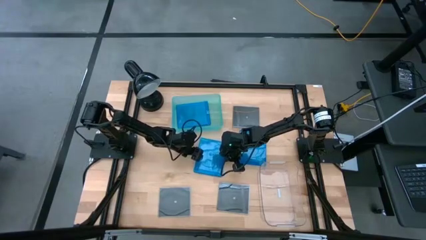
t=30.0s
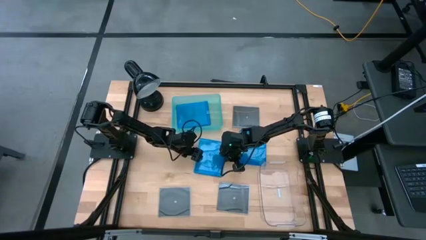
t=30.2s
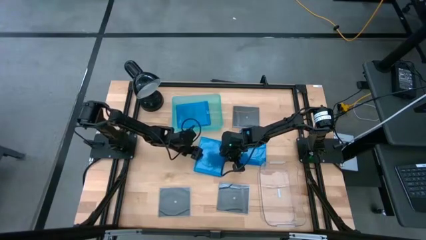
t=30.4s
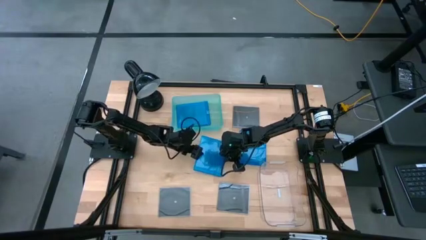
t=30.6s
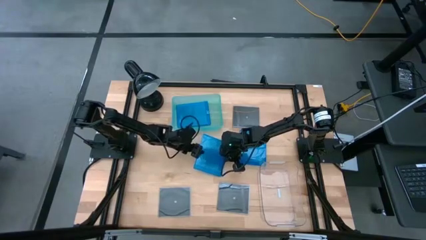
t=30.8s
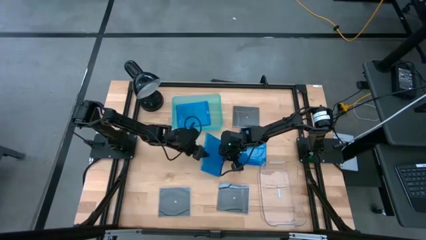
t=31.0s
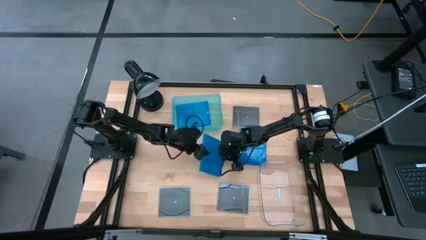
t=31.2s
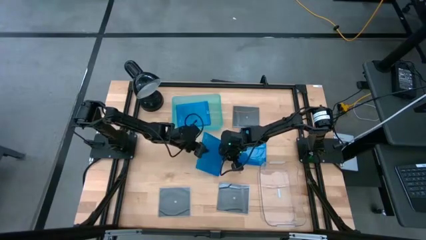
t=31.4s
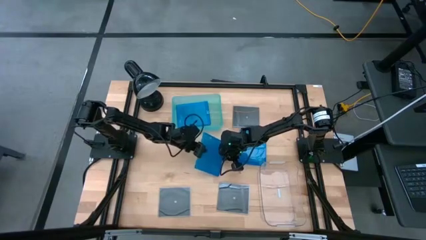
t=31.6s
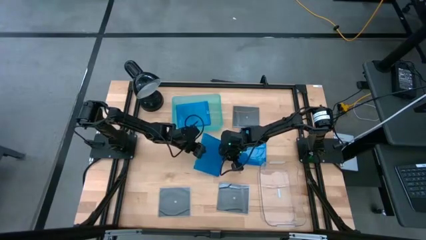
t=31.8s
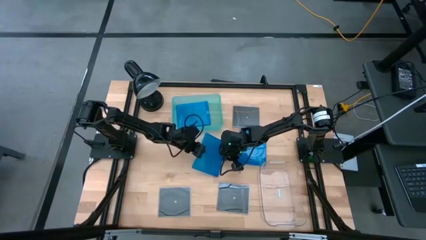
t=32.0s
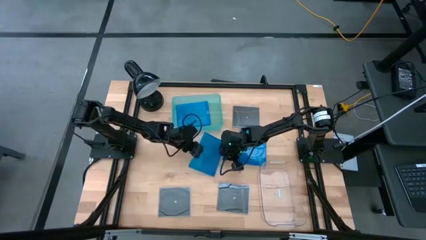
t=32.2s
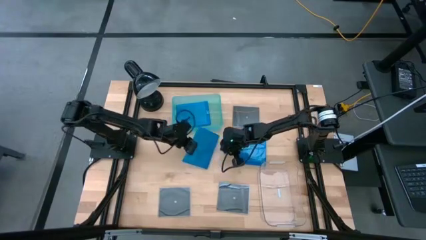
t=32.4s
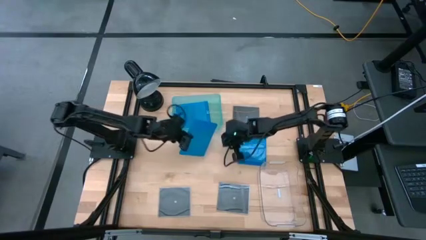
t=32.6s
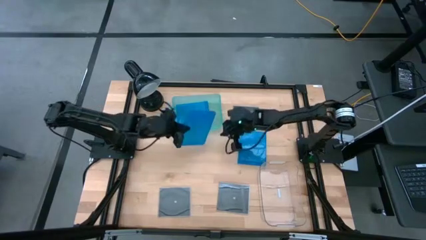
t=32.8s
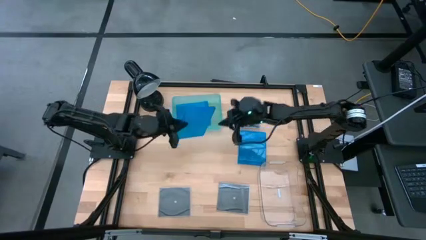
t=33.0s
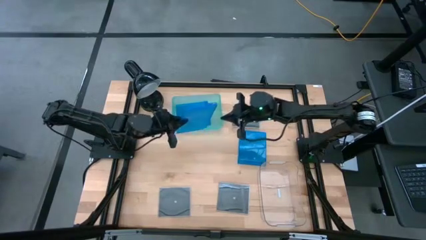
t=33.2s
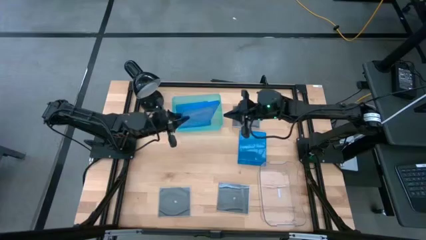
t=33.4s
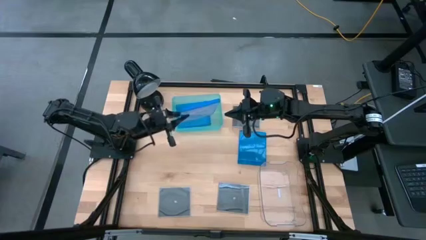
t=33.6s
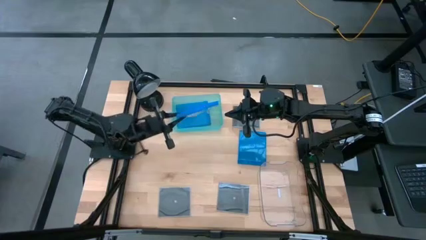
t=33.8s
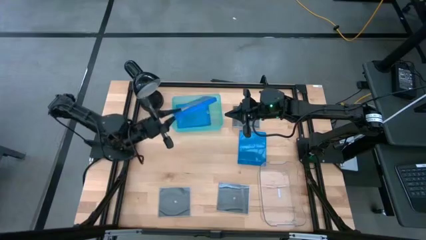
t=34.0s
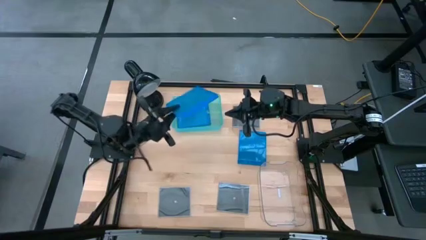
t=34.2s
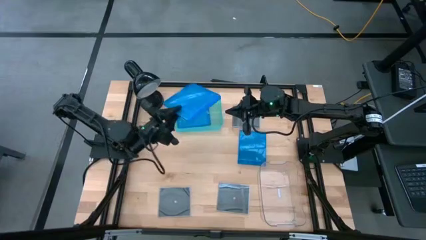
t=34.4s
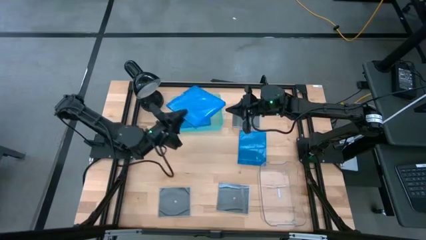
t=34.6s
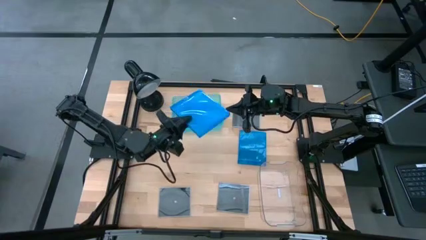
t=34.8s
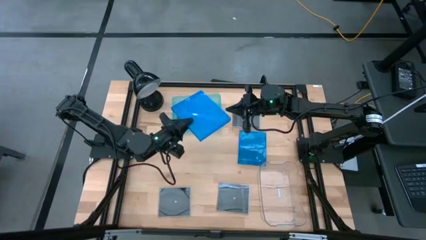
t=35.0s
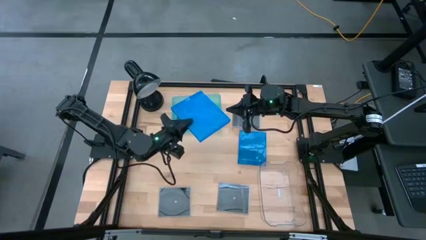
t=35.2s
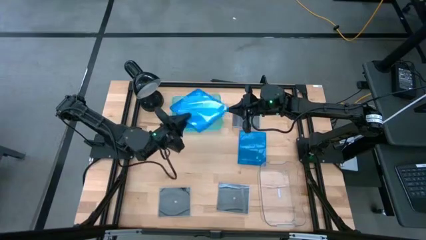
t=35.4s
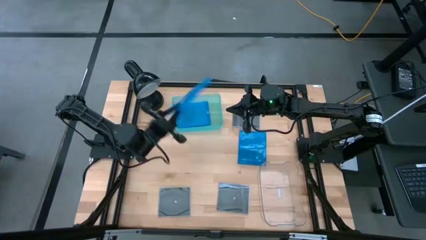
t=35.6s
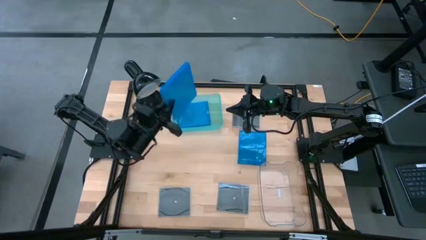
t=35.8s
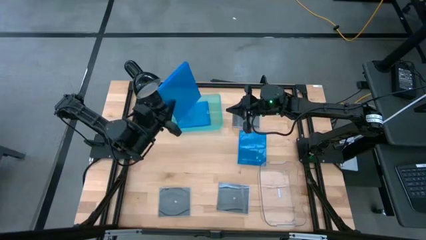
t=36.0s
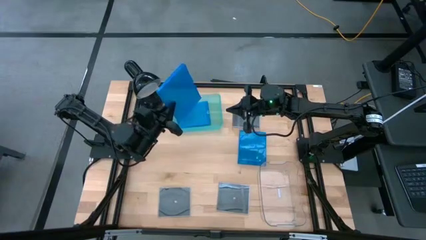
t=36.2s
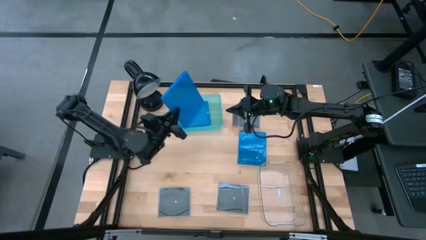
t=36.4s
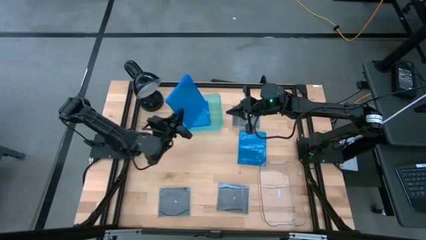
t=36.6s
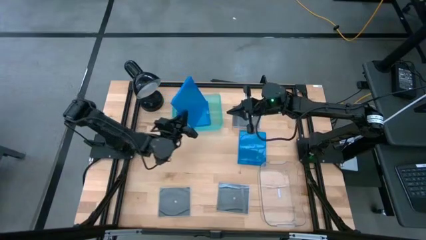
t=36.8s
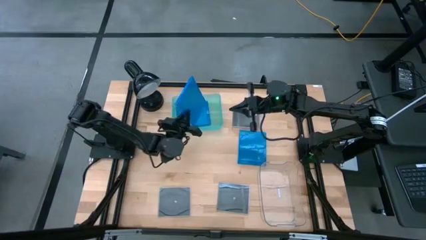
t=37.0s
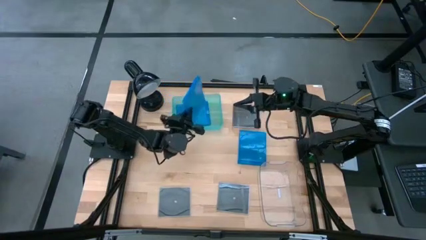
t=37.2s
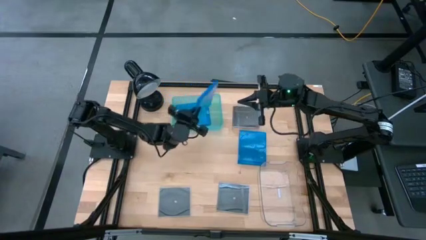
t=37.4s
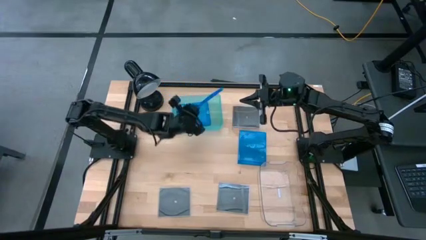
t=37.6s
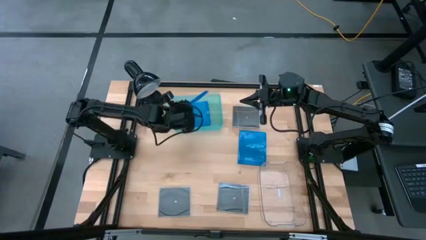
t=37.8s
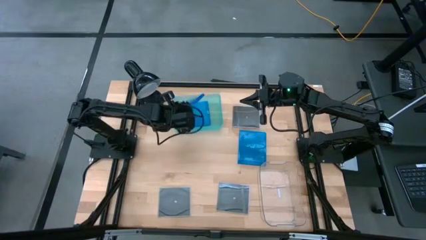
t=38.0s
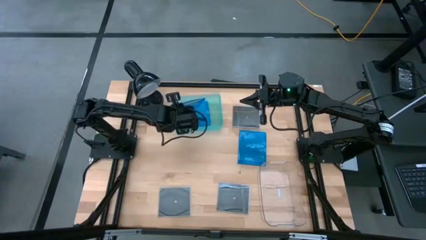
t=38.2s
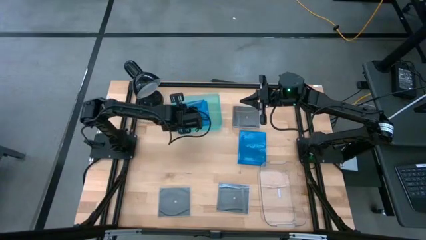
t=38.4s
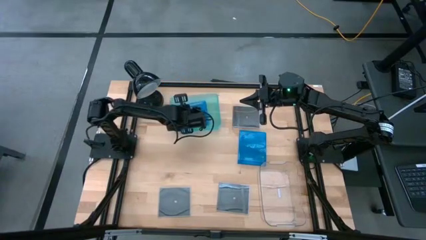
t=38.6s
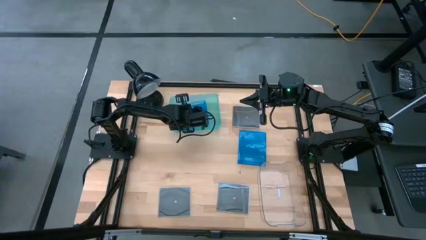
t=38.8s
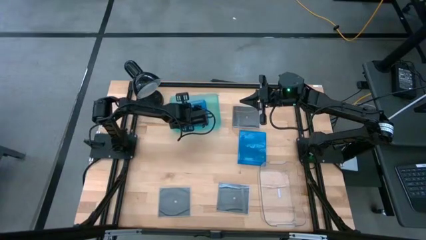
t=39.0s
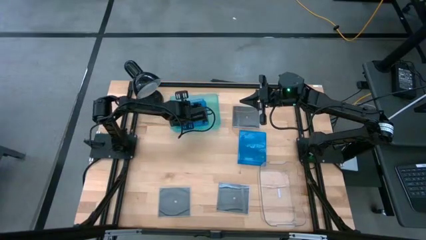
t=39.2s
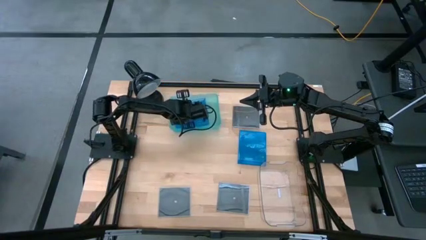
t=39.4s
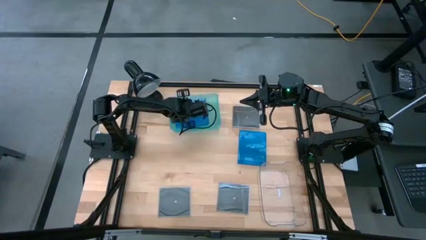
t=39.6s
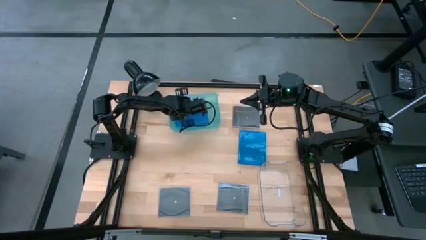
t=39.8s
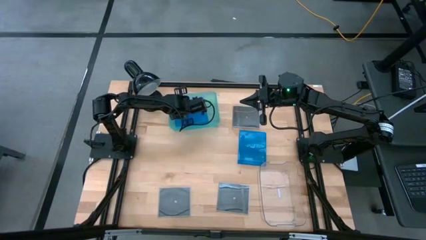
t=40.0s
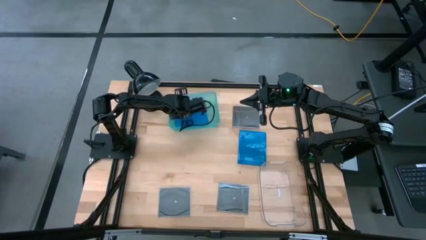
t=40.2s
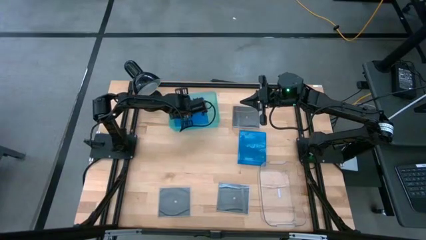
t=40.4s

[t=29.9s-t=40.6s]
Task: Pick & place jewel cases by type
Put the left blue CD case into the green bin

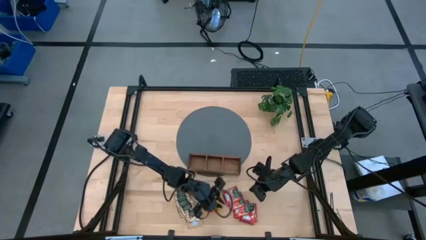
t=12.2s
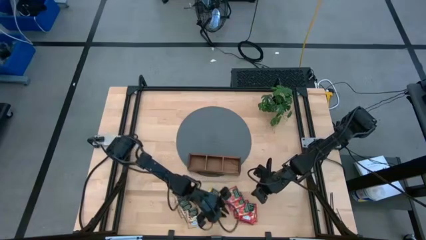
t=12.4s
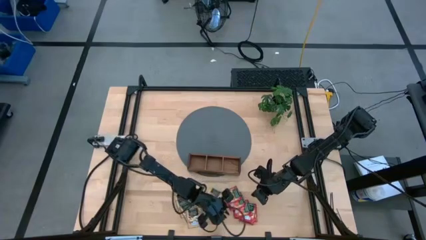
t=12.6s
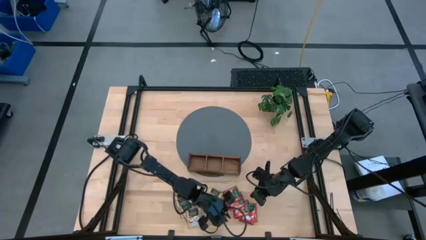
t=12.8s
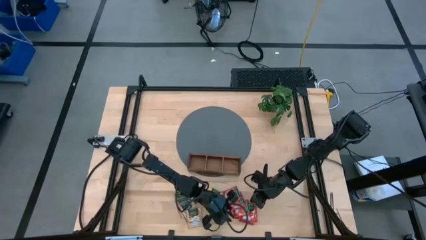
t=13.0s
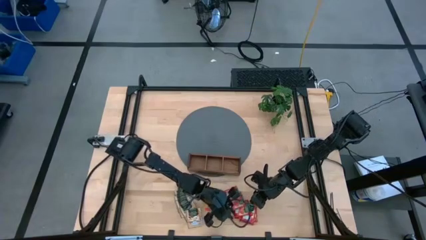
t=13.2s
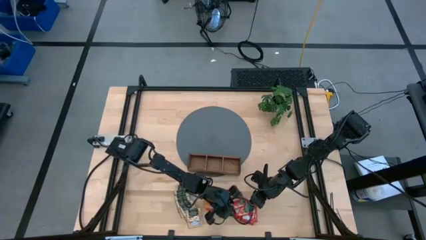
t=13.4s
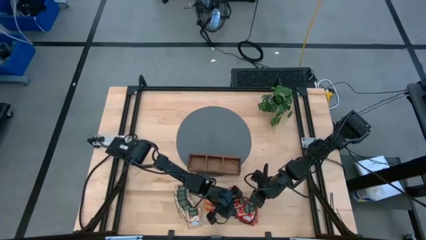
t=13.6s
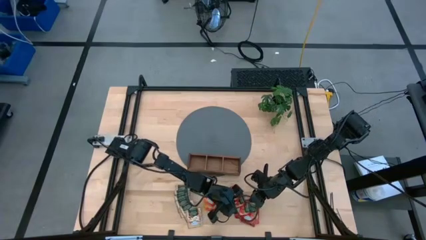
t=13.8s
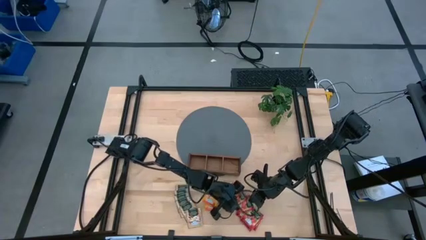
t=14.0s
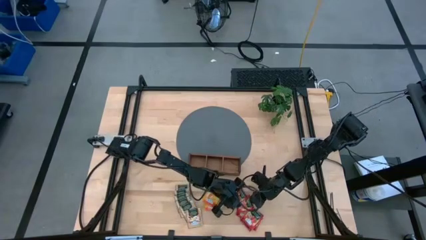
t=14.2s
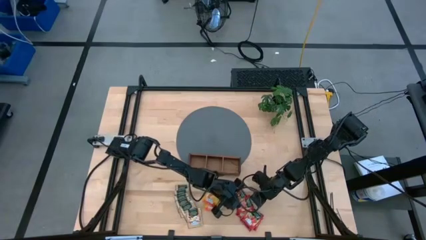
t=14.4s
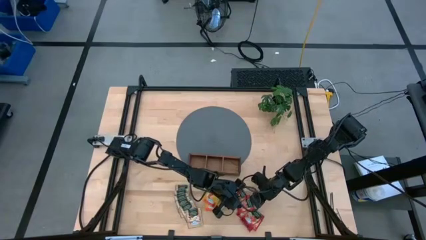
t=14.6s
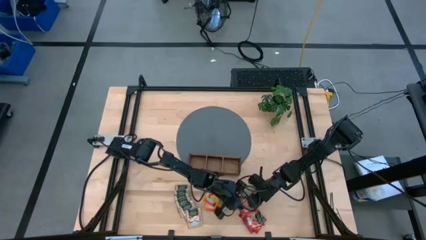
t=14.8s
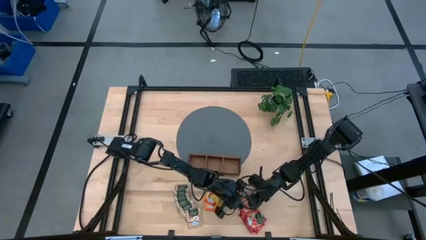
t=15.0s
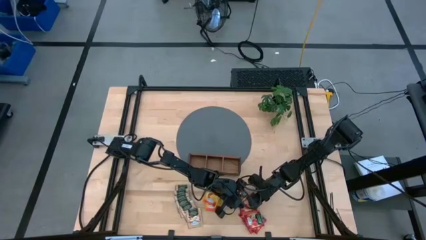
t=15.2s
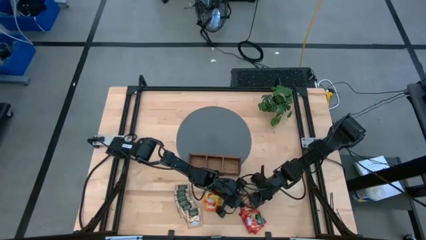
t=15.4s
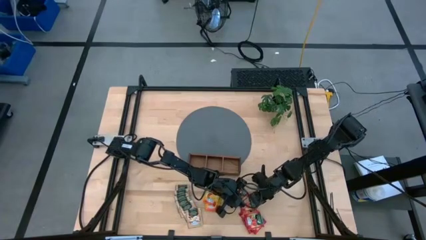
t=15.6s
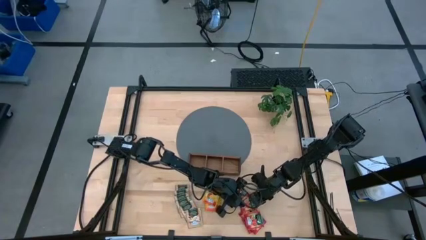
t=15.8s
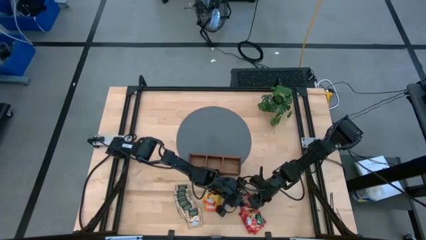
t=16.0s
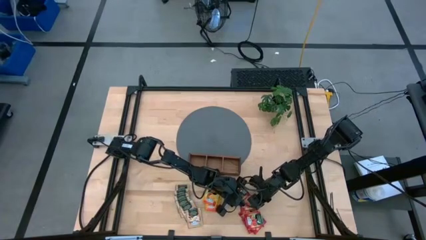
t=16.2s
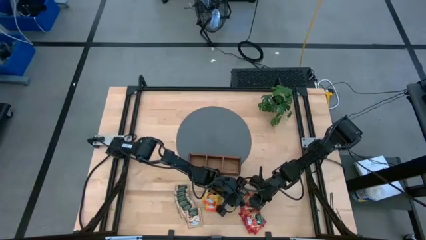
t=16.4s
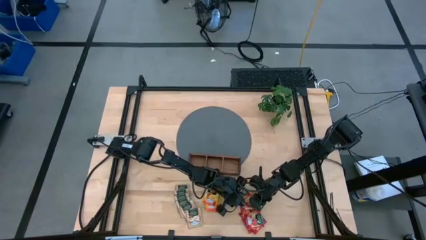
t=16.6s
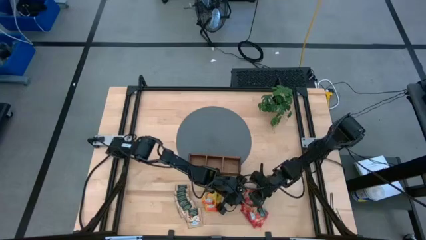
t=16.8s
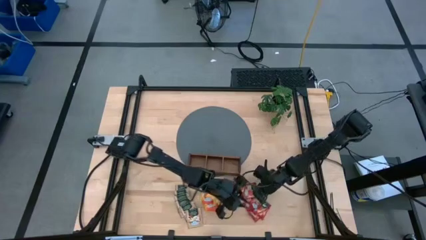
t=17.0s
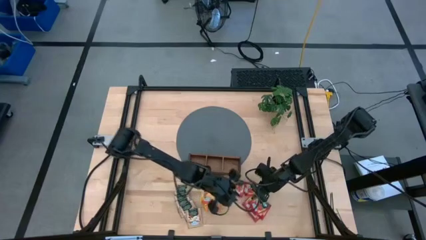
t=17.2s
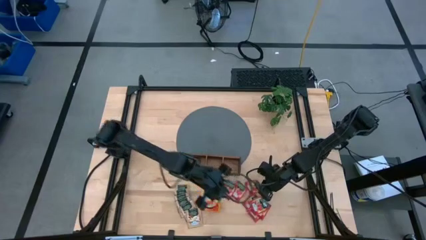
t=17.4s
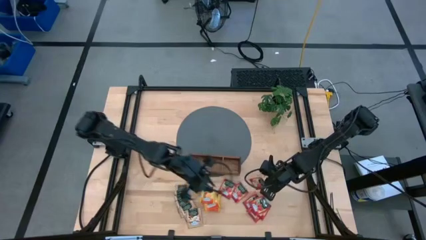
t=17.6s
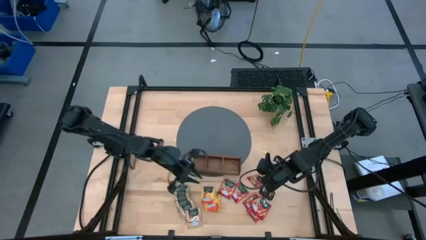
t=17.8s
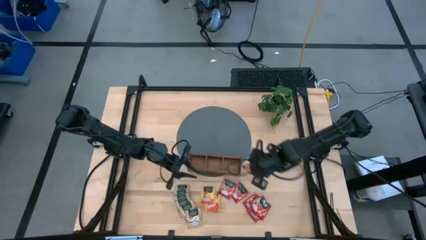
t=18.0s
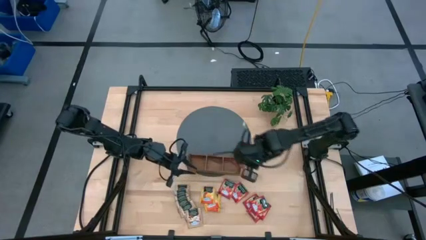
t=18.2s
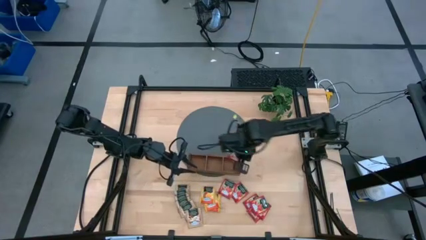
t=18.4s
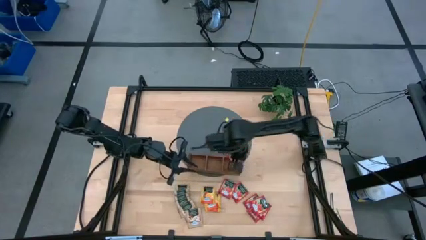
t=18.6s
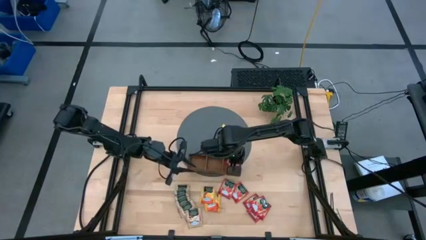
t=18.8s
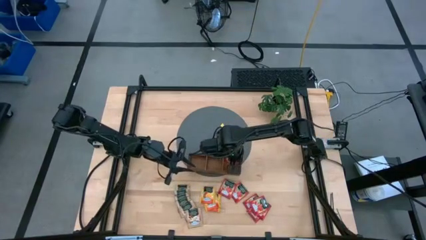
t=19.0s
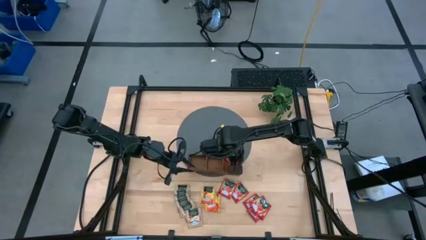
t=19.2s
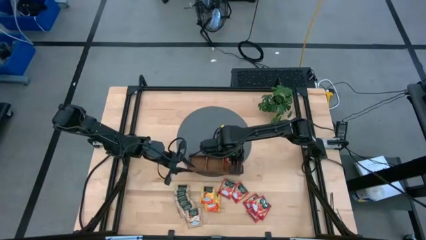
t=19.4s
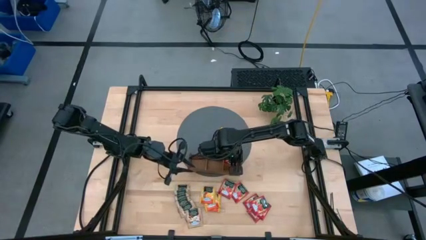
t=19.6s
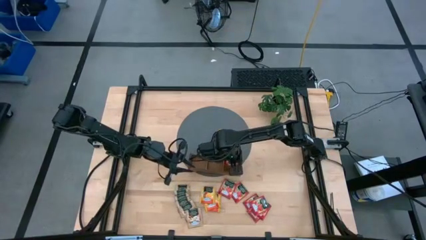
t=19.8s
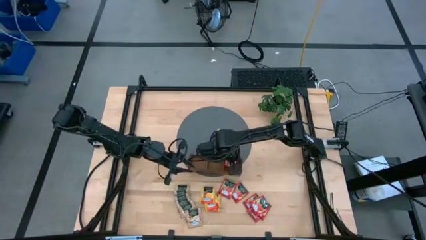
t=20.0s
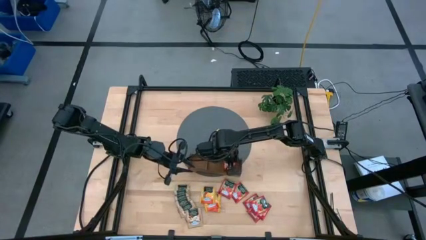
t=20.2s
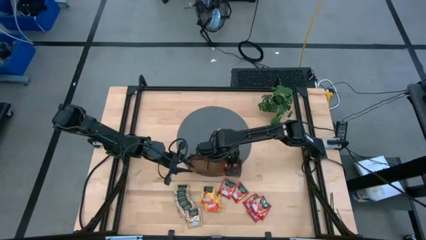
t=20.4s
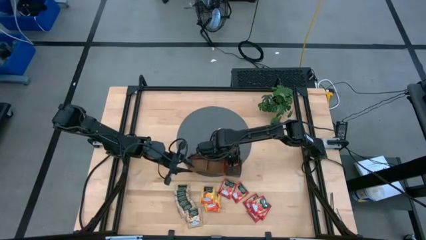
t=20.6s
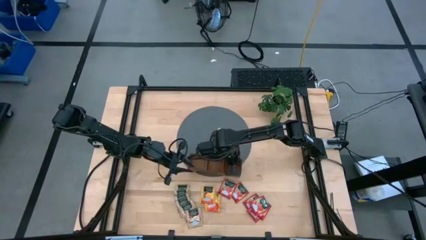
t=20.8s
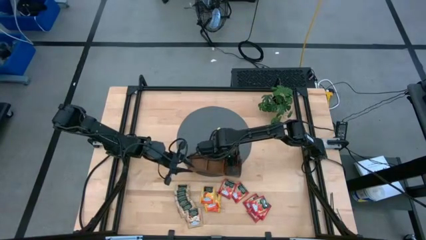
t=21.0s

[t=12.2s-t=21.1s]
Task: Pick & Place Tea
Put the red tea bag into the right section of the wooden organizer
